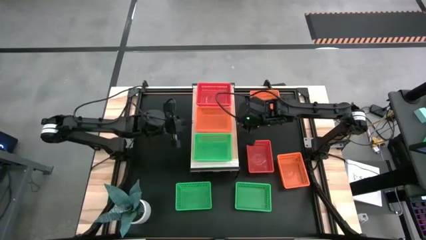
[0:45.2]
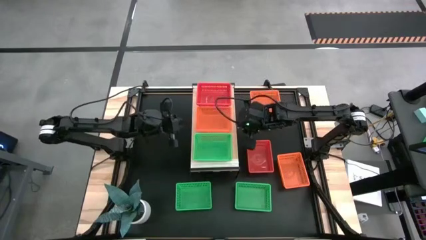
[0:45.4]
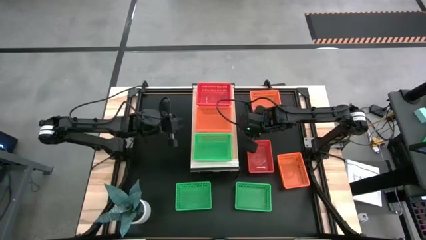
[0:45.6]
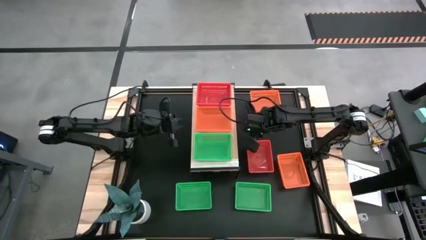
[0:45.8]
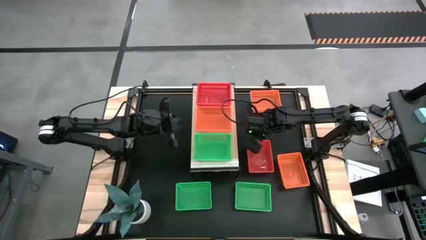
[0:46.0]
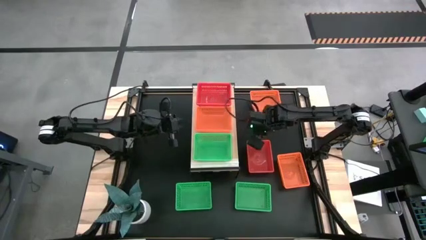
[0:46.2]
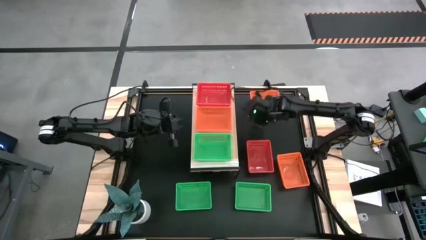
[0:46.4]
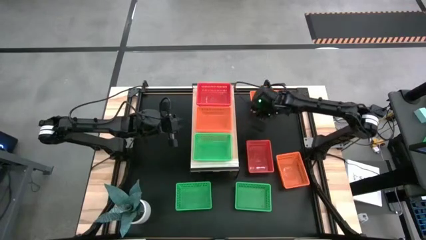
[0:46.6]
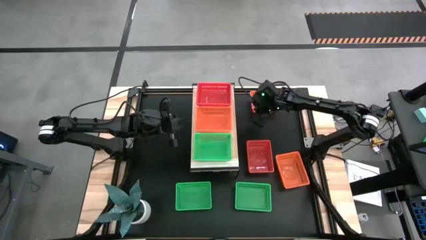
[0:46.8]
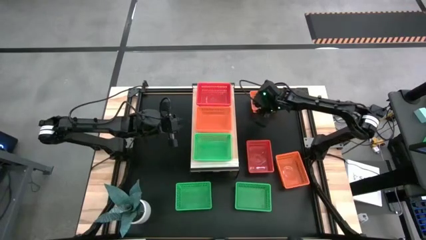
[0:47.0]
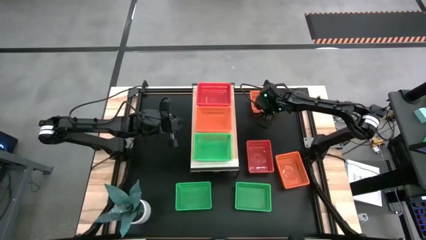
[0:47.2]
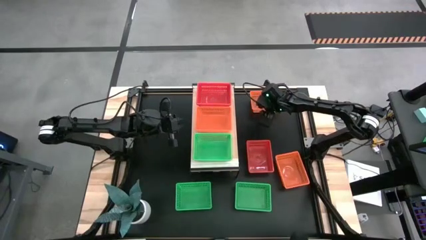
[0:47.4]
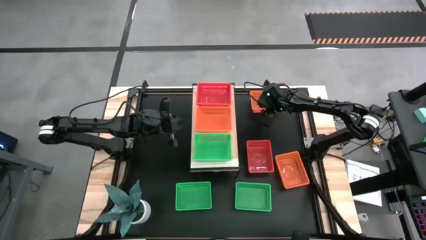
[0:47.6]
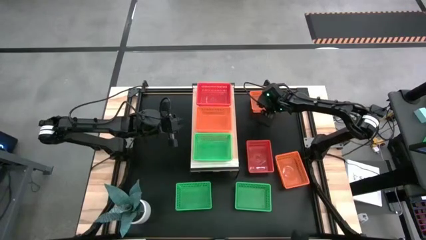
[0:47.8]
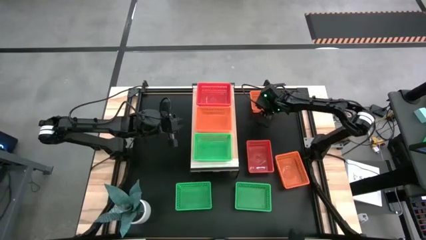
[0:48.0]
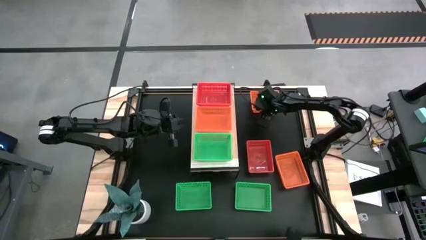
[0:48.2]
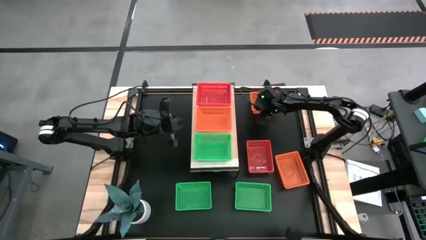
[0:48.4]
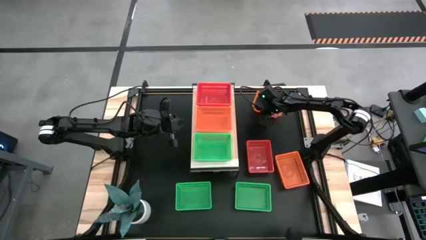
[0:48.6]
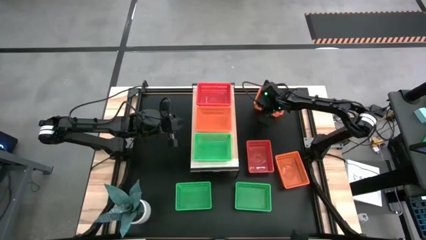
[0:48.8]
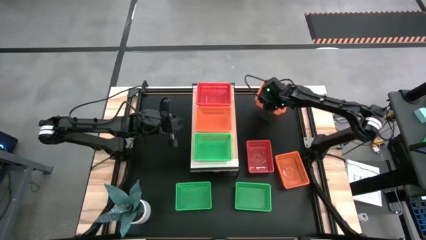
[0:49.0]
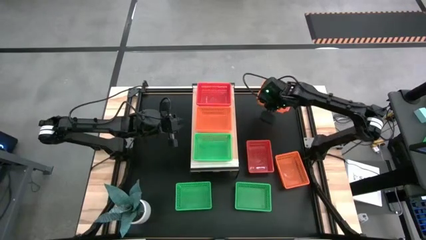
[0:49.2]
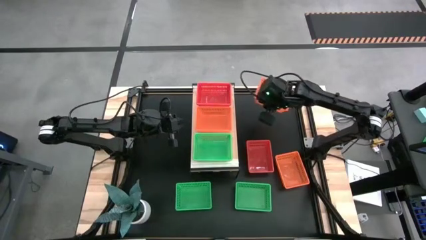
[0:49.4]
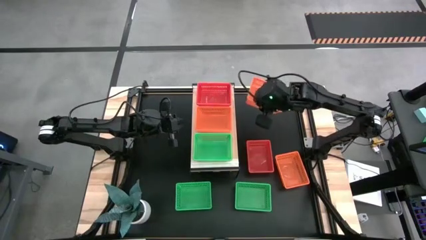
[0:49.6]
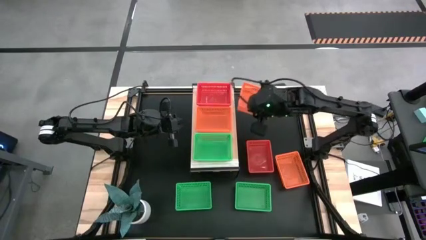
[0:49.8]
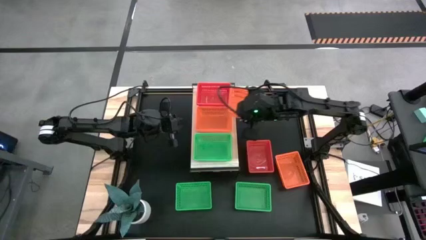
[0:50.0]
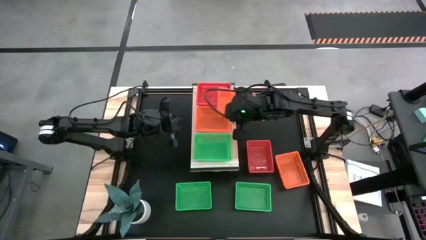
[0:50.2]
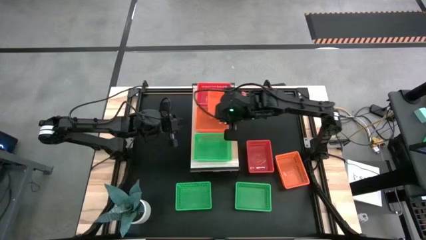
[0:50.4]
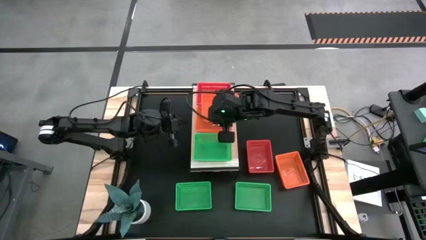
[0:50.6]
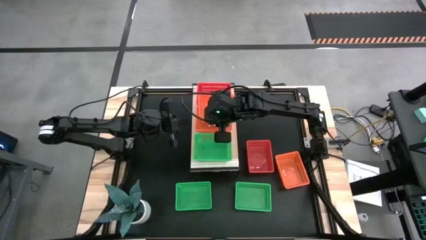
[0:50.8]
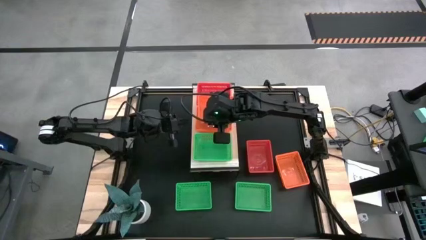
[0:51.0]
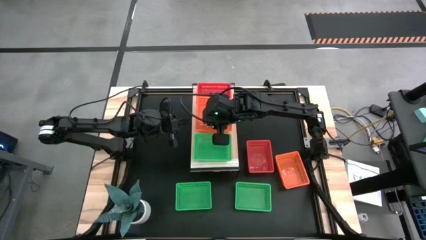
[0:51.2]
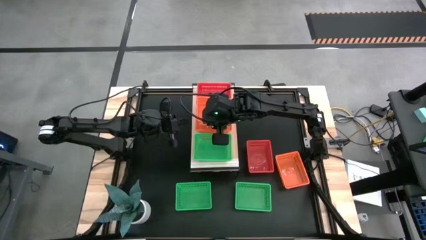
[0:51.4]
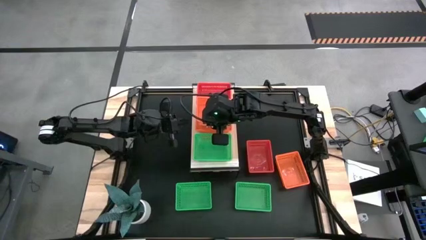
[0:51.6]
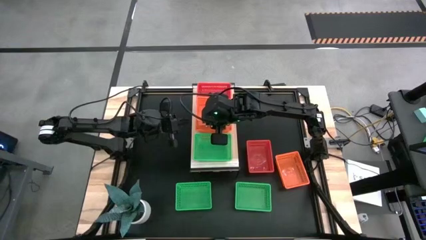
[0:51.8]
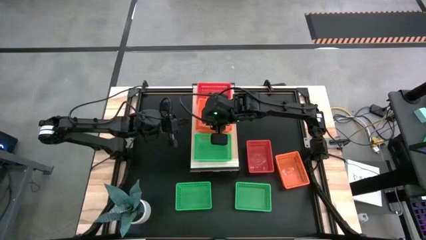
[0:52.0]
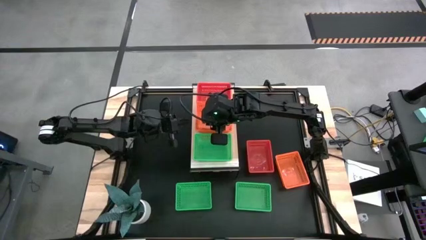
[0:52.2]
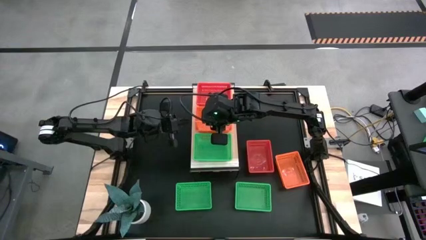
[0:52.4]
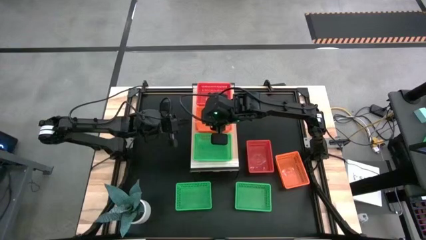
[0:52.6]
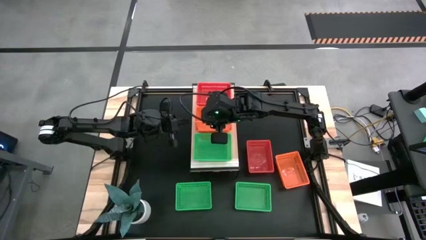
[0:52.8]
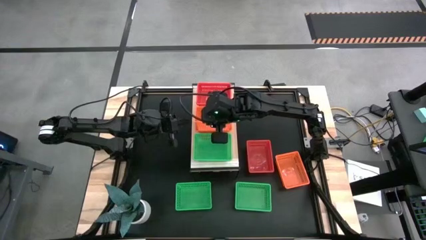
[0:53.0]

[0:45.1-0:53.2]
Task: Stack baskets on shelf by color
Stack the top orange bin on the orange bin on the shelf

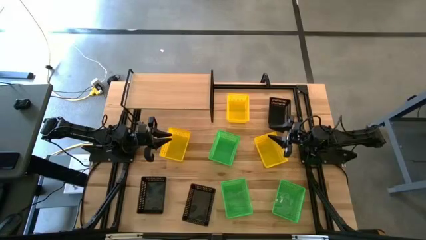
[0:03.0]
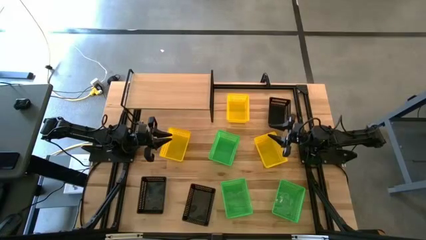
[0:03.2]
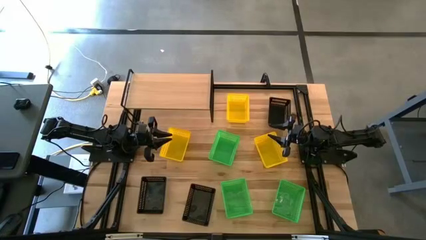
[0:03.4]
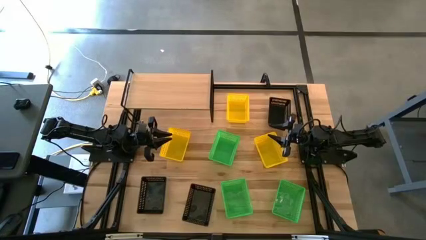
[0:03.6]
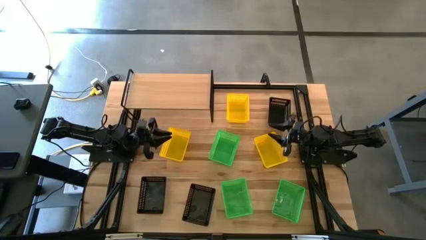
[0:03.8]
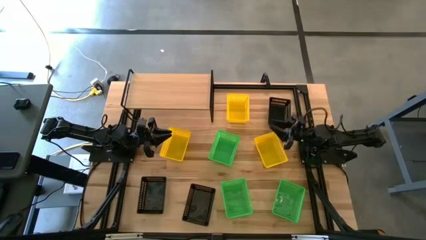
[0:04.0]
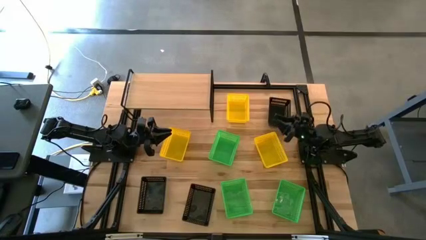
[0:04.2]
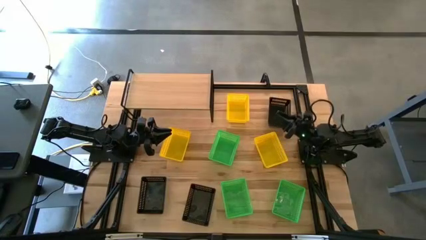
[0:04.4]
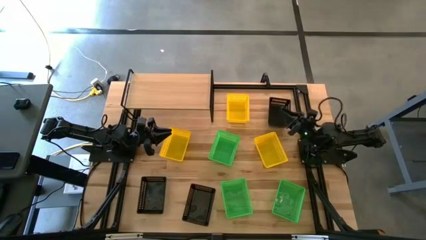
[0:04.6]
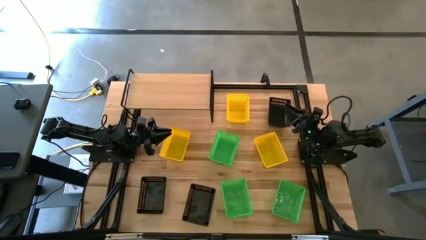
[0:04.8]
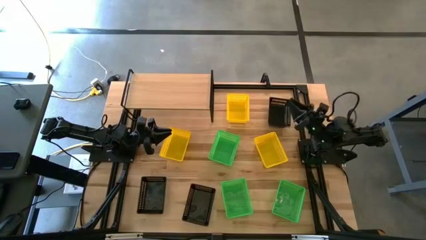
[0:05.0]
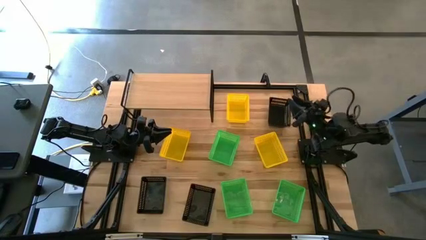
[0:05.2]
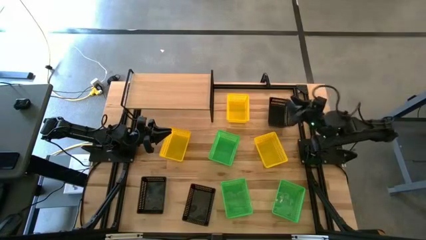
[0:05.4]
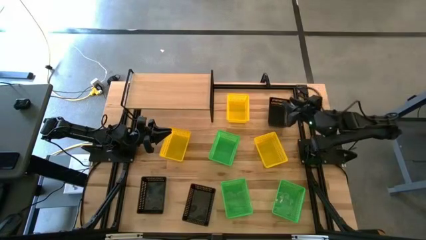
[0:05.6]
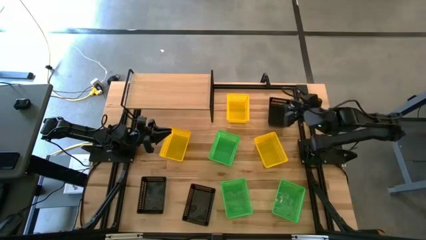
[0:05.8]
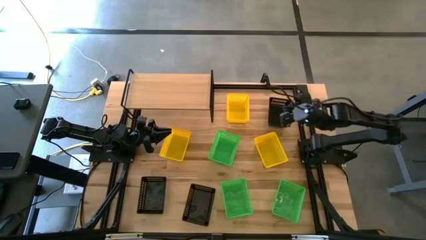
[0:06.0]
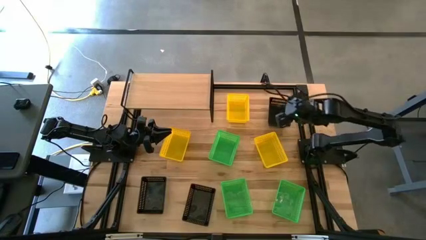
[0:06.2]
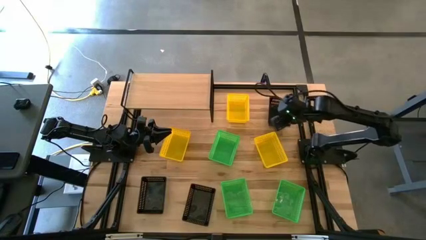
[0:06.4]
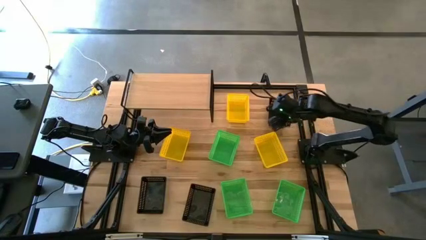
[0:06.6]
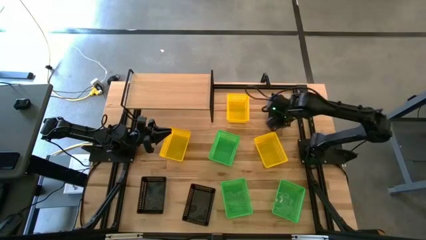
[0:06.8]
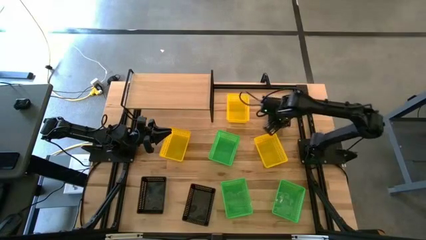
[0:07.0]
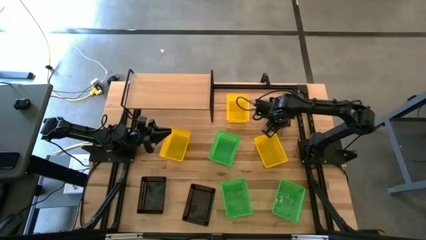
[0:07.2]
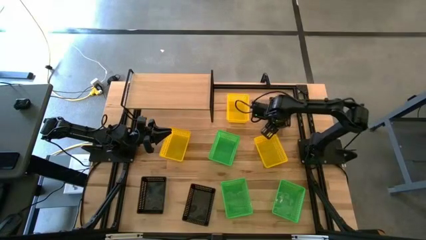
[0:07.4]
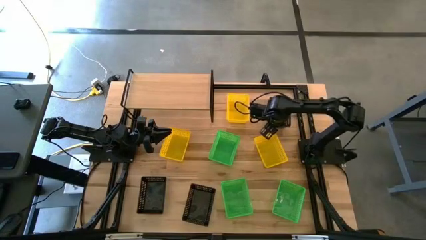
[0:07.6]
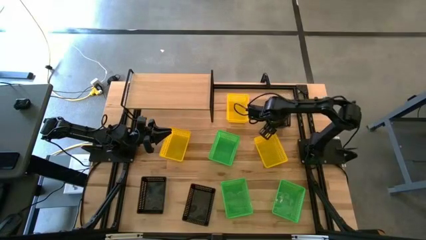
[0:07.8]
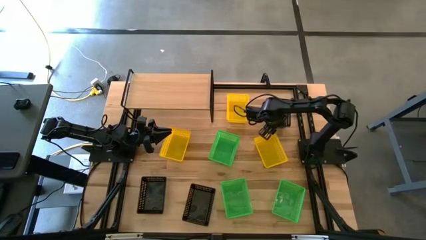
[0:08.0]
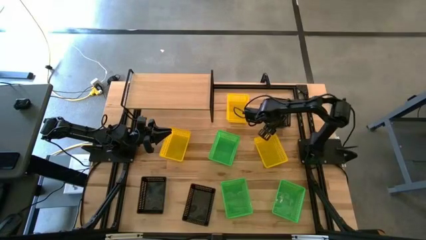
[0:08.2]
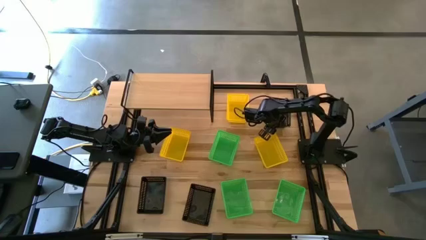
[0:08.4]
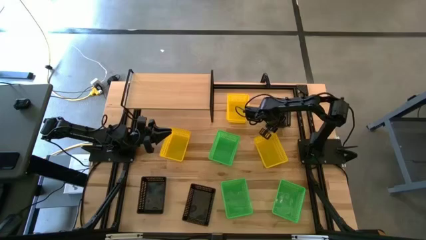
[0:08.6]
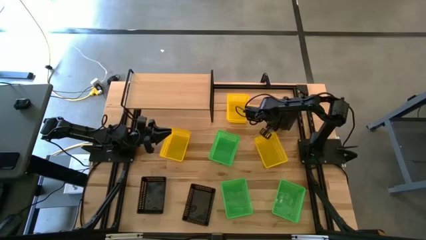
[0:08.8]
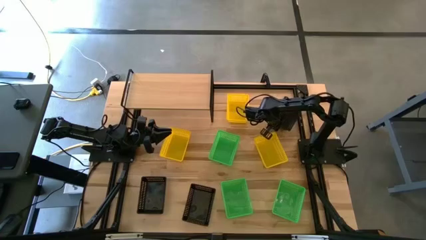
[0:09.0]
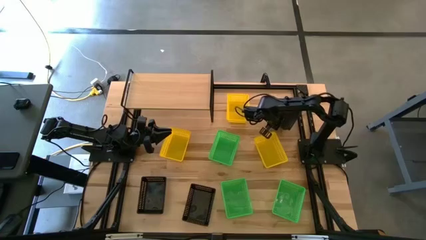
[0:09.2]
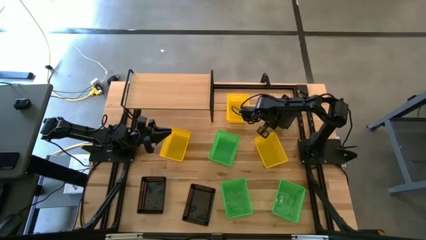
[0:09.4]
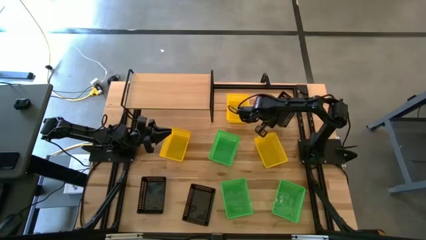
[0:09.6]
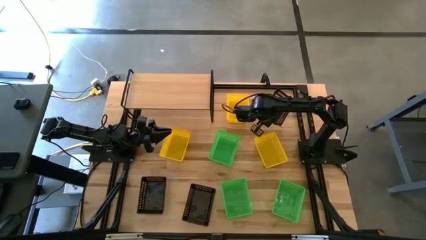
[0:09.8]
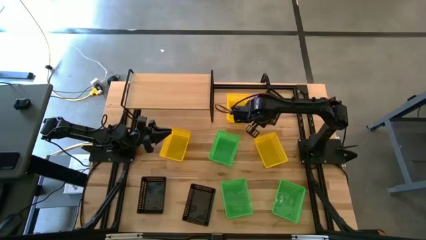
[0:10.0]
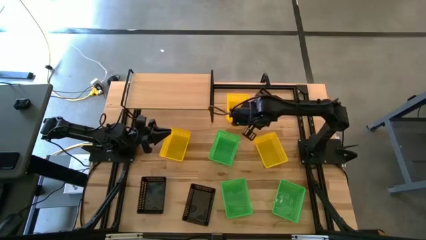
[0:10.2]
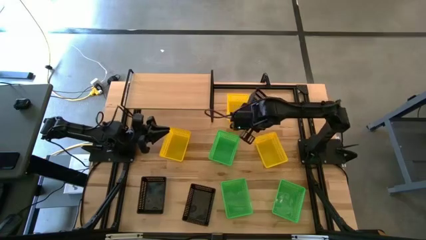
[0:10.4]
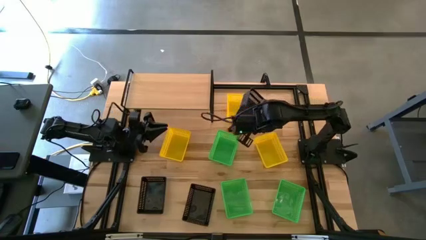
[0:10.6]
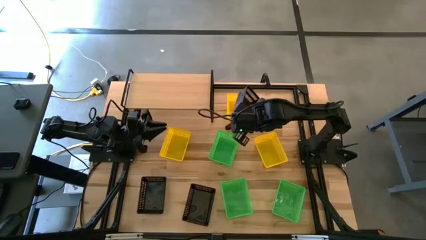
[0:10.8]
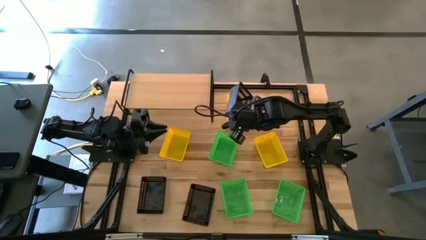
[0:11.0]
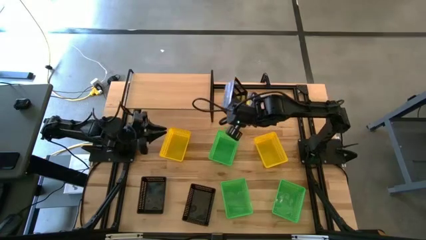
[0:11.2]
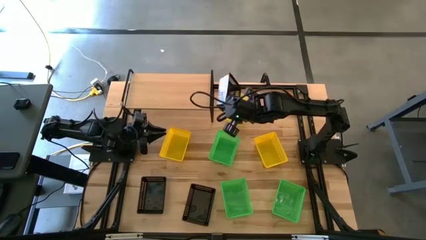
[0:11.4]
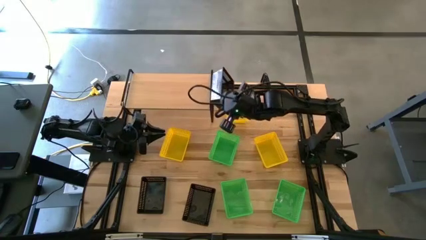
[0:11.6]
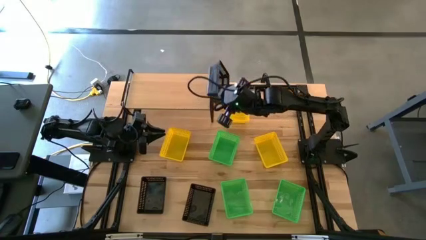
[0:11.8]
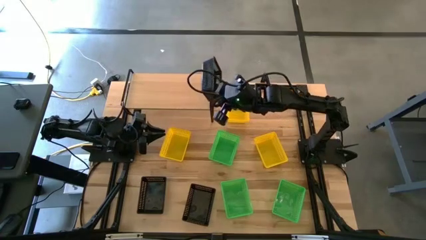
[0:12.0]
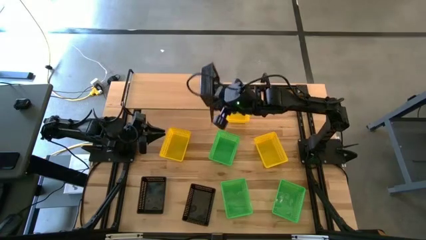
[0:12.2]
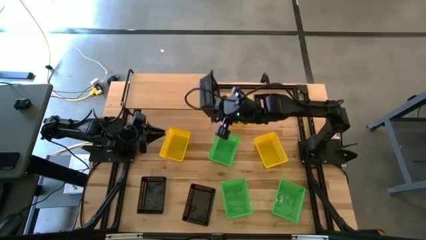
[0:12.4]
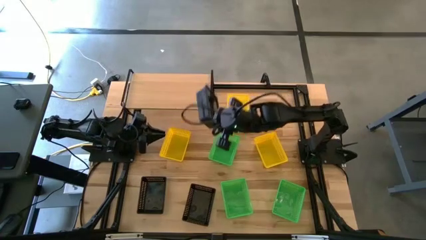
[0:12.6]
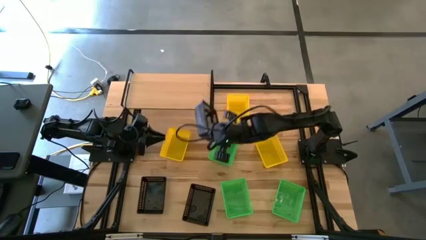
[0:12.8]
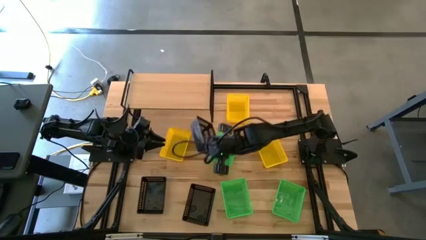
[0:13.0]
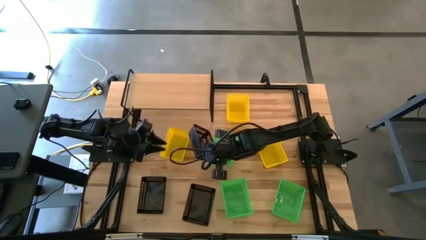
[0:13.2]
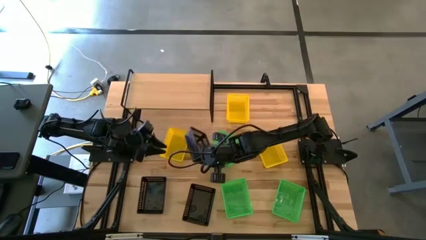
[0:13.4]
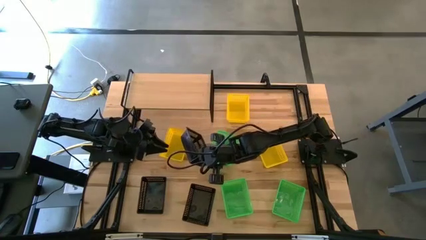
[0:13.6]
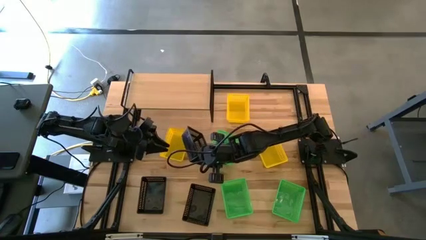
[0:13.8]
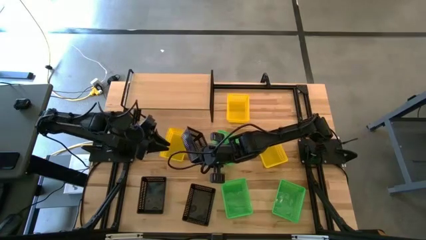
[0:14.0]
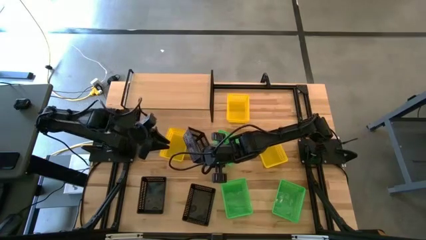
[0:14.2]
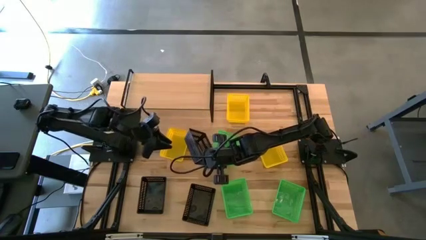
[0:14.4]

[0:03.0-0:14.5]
Task: Stack baskets on shelf by color
Put the top right black bin on the shelf
